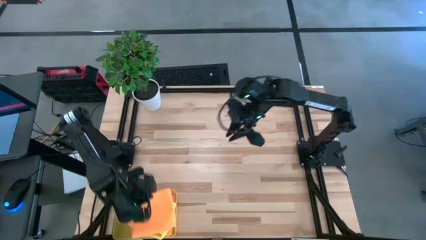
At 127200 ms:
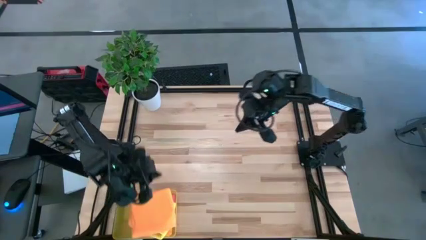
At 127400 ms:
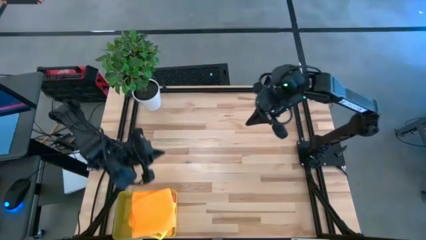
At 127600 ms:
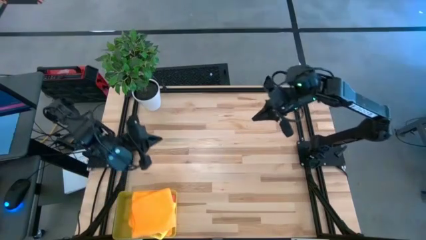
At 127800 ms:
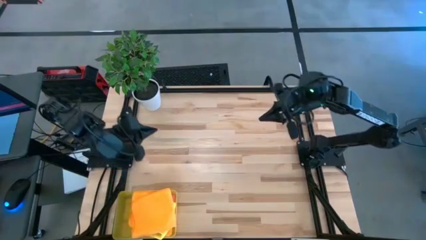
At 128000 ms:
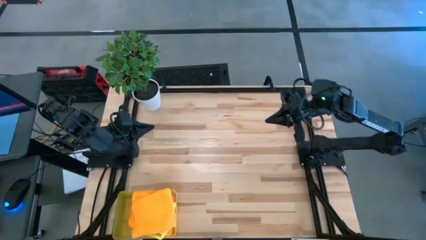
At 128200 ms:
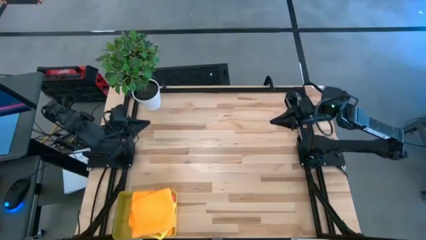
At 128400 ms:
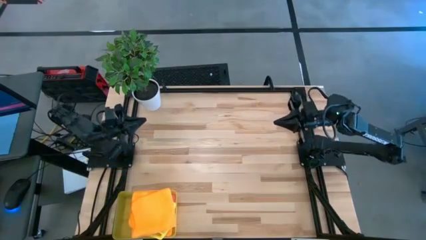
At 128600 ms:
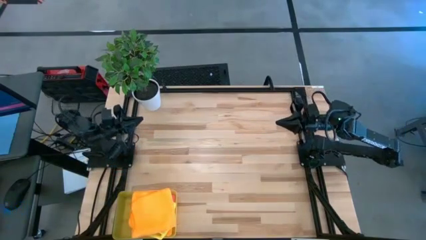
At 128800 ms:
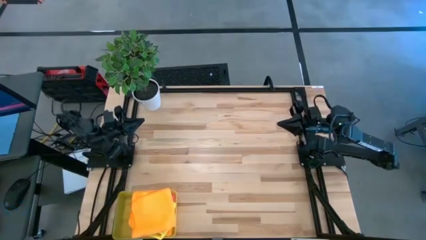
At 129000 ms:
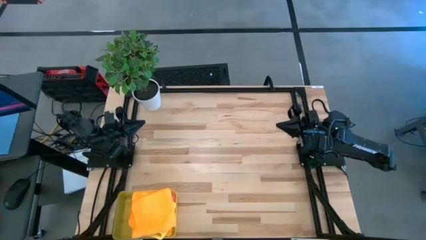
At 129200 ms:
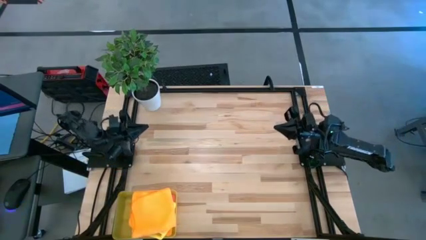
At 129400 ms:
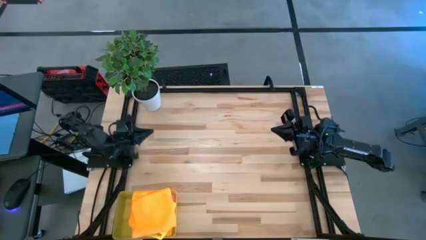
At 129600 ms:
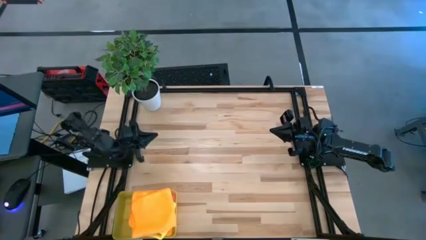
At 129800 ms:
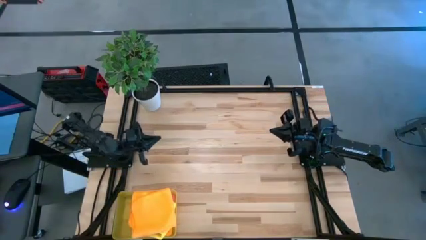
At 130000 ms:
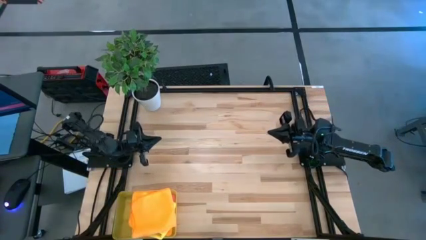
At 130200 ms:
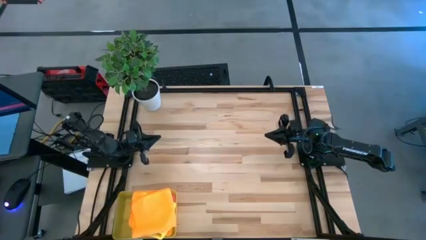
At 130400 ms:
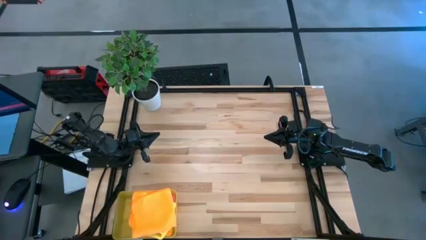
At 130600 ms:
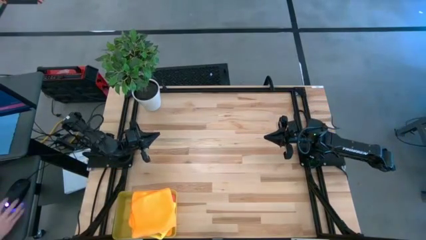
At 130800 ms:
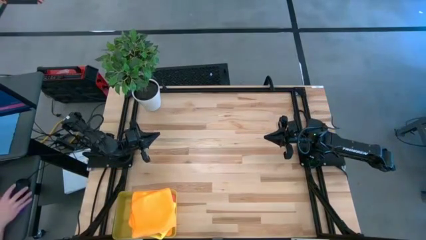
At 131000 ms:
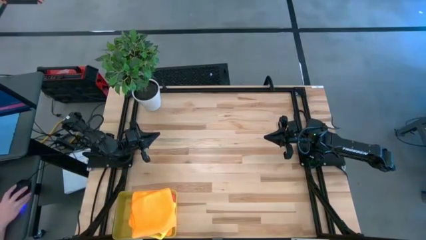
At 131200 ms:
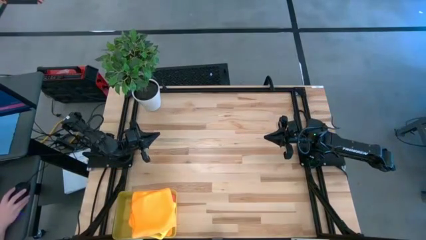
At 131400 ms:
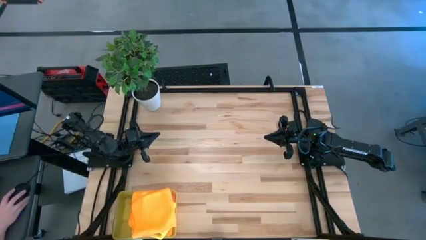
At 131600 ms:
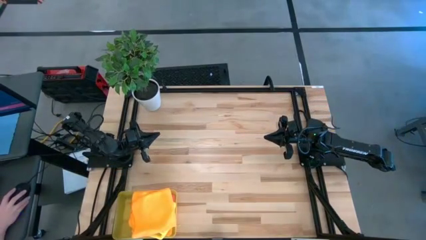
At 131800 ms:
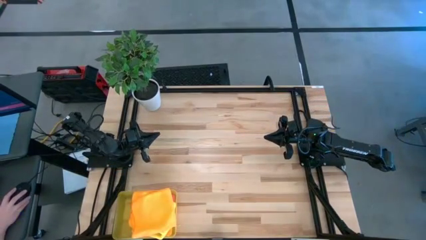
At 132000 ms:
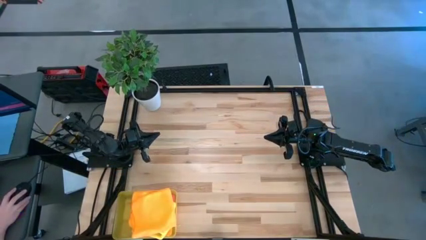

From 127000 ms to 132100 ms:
Task: Fold microfiber towels
Return to Home Position

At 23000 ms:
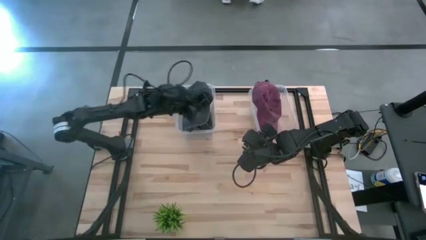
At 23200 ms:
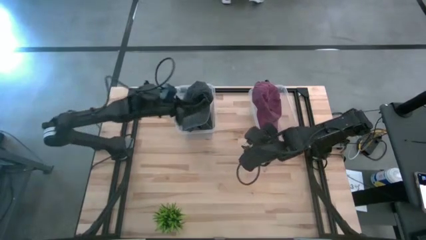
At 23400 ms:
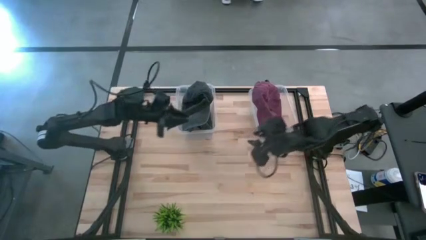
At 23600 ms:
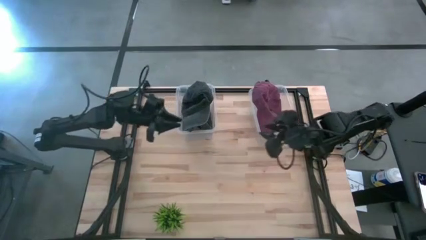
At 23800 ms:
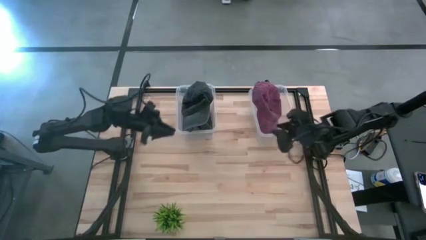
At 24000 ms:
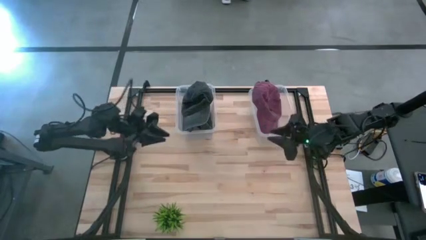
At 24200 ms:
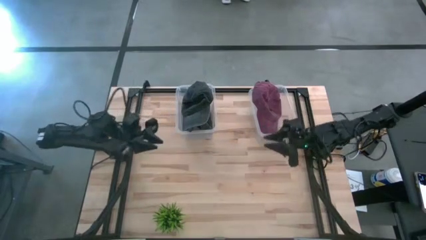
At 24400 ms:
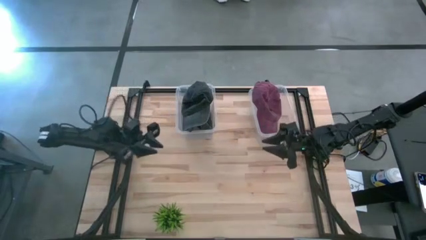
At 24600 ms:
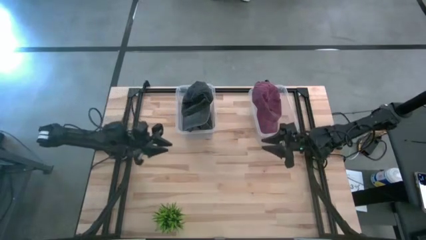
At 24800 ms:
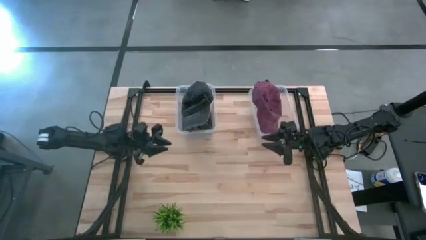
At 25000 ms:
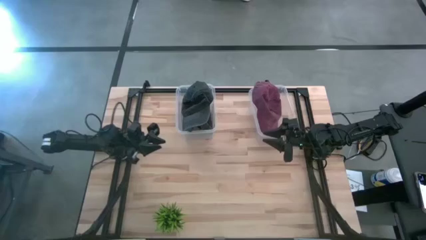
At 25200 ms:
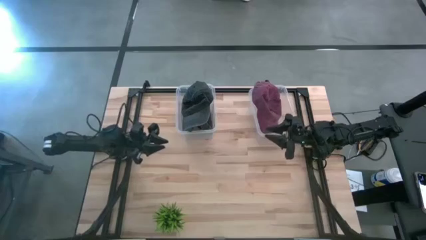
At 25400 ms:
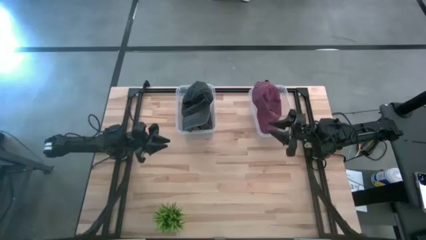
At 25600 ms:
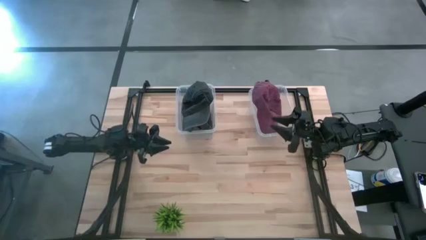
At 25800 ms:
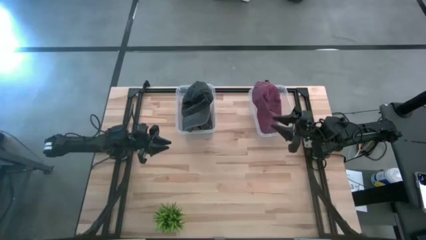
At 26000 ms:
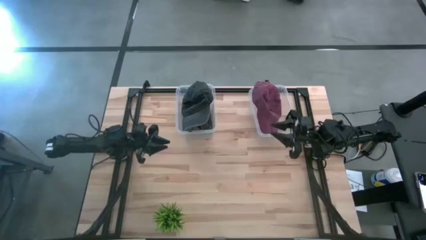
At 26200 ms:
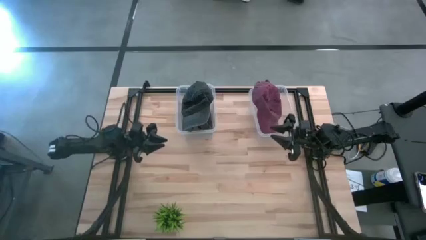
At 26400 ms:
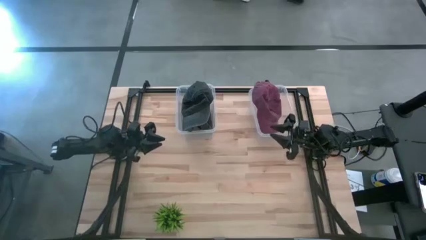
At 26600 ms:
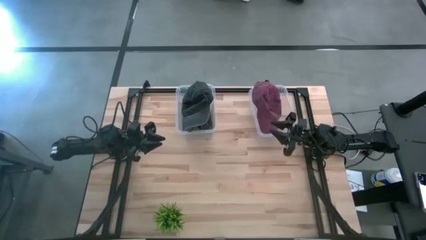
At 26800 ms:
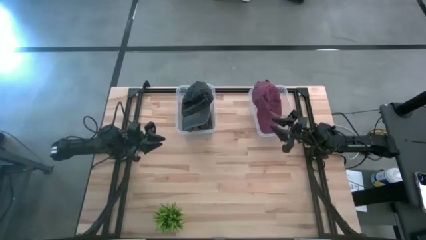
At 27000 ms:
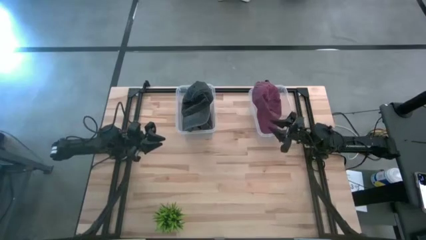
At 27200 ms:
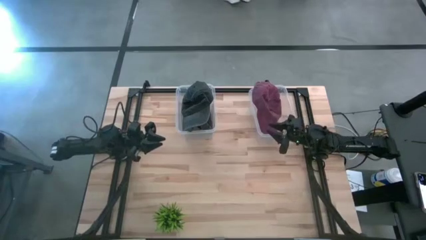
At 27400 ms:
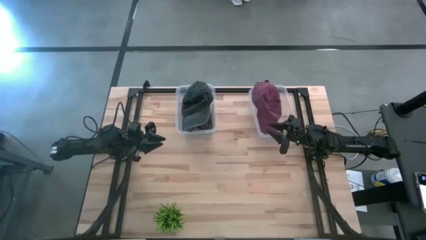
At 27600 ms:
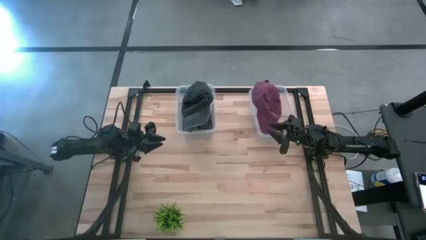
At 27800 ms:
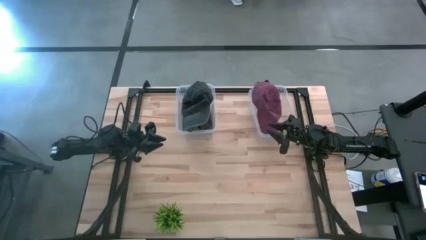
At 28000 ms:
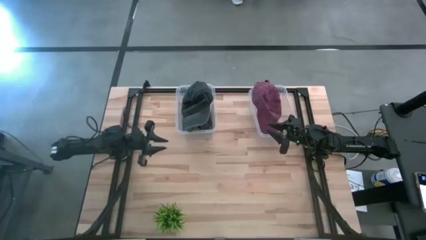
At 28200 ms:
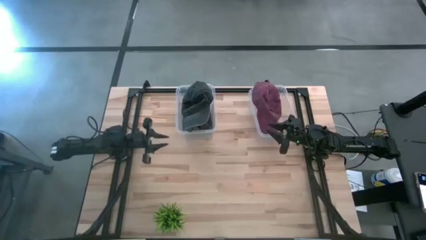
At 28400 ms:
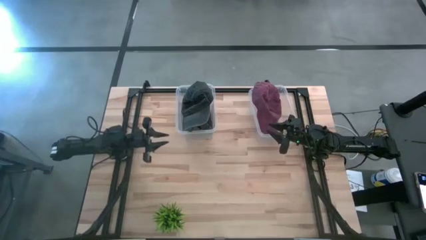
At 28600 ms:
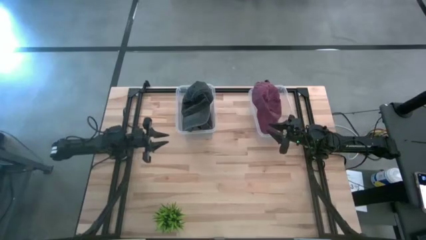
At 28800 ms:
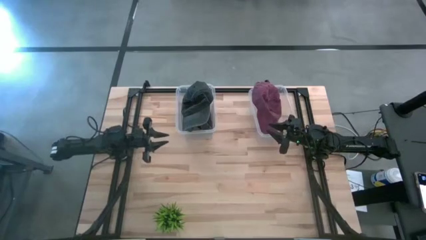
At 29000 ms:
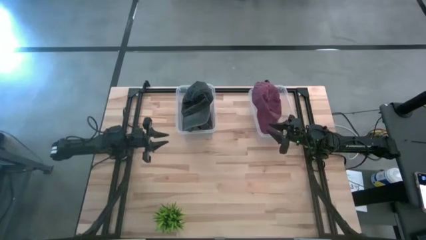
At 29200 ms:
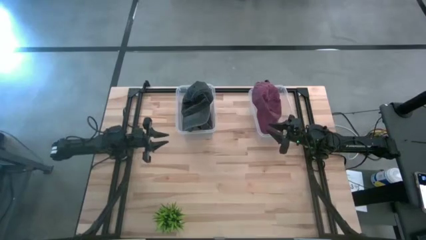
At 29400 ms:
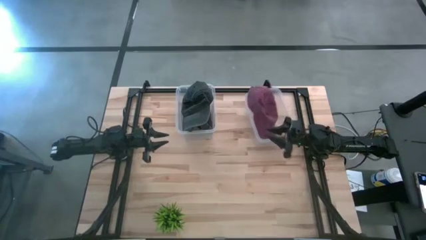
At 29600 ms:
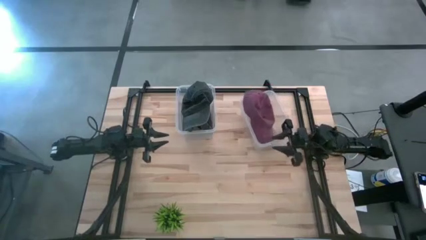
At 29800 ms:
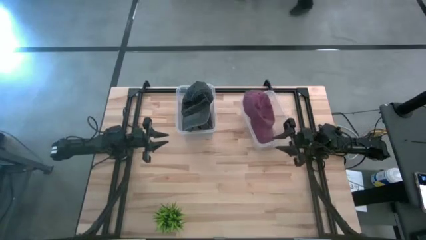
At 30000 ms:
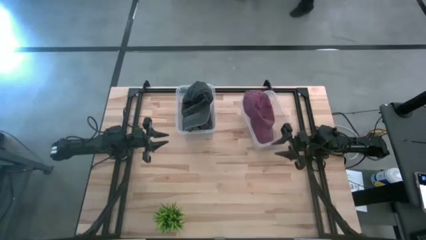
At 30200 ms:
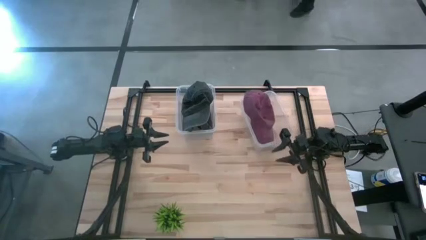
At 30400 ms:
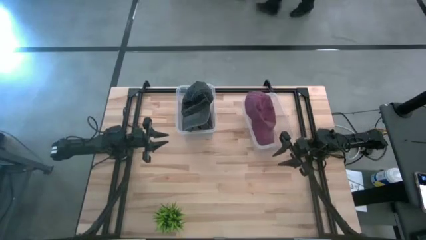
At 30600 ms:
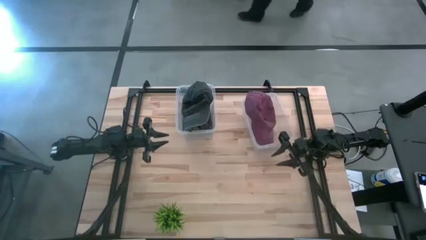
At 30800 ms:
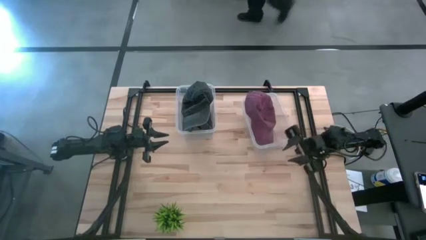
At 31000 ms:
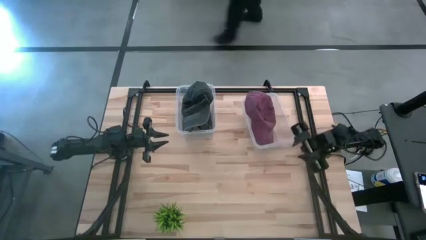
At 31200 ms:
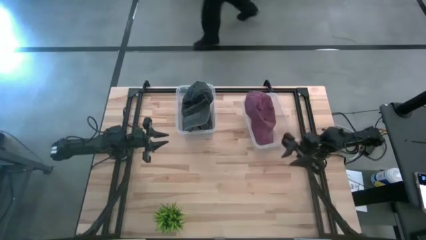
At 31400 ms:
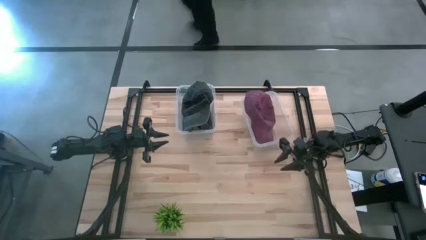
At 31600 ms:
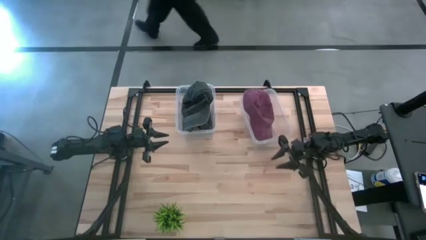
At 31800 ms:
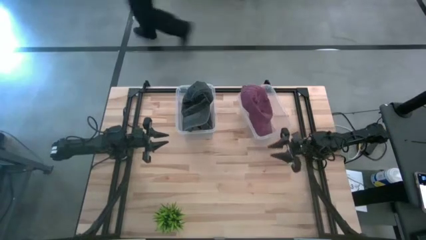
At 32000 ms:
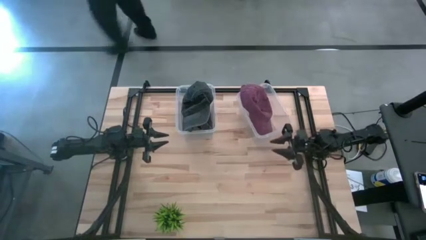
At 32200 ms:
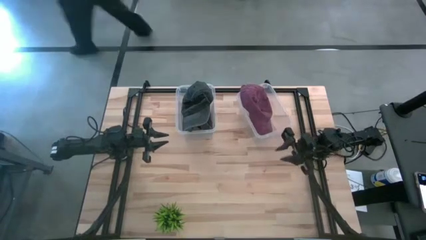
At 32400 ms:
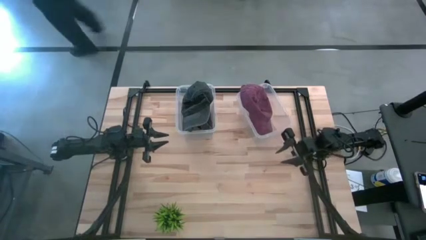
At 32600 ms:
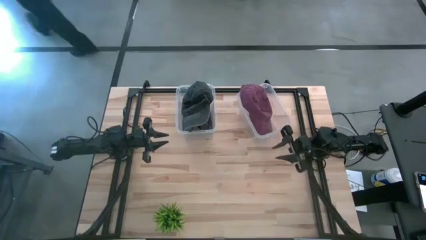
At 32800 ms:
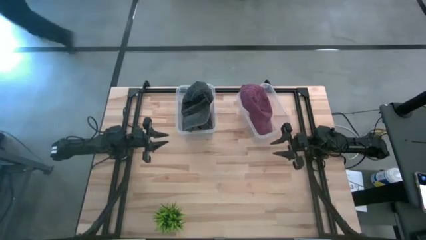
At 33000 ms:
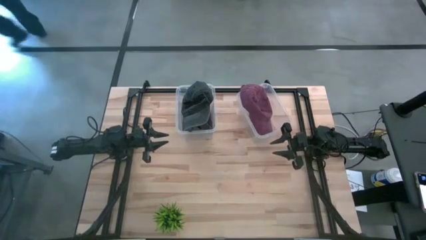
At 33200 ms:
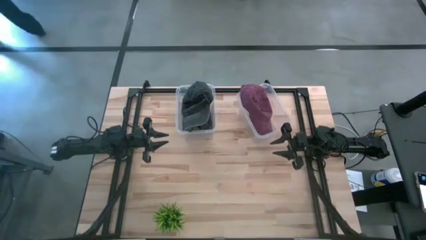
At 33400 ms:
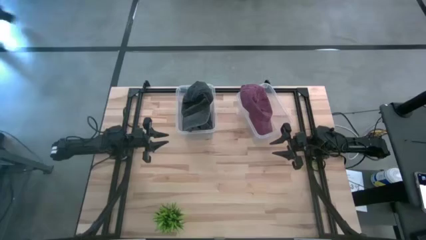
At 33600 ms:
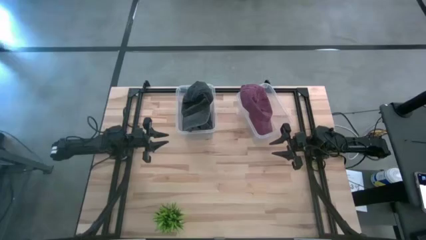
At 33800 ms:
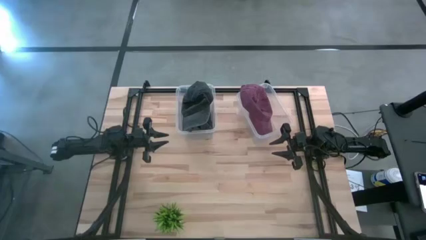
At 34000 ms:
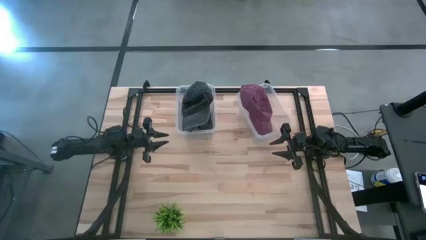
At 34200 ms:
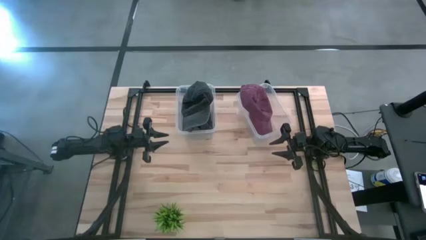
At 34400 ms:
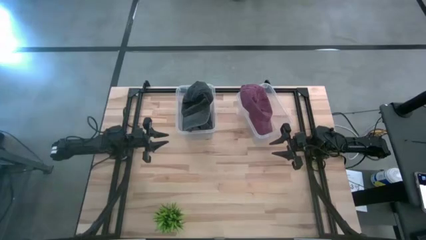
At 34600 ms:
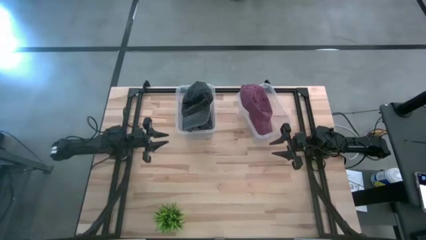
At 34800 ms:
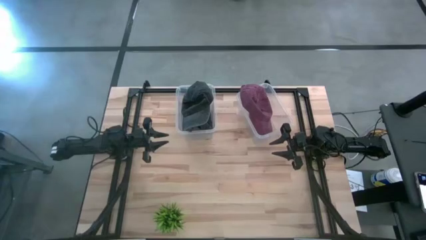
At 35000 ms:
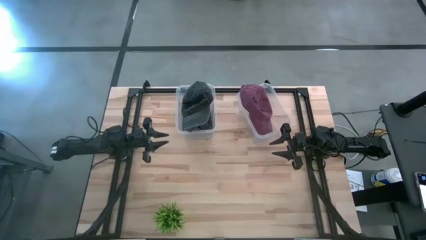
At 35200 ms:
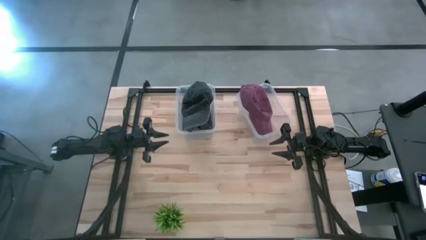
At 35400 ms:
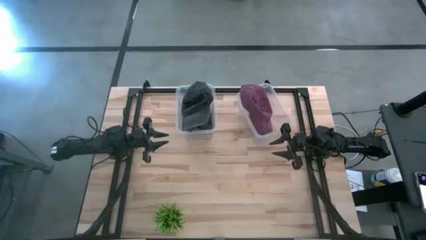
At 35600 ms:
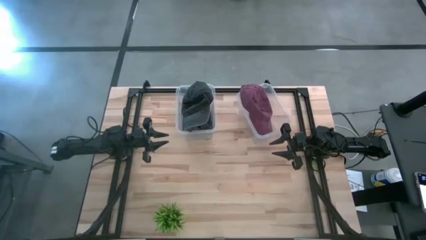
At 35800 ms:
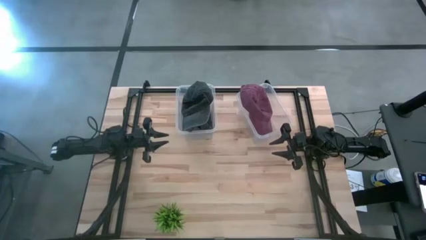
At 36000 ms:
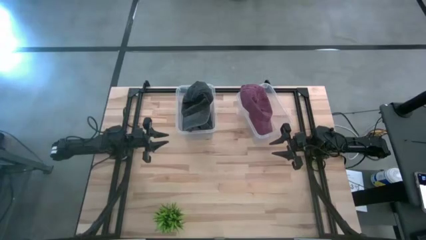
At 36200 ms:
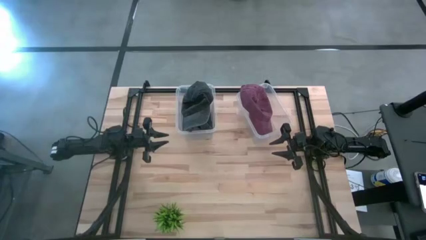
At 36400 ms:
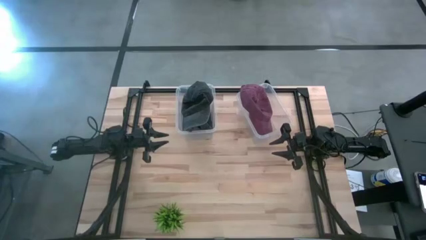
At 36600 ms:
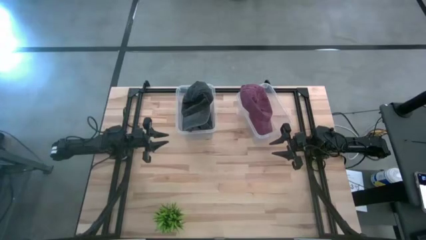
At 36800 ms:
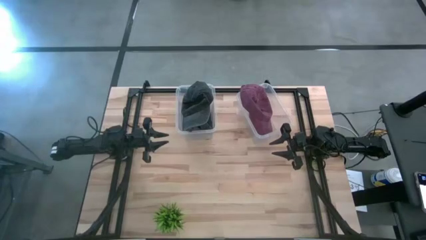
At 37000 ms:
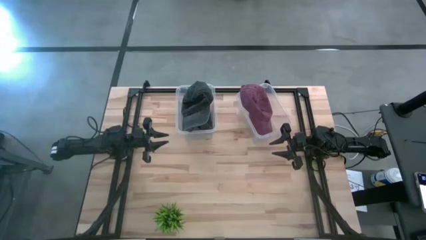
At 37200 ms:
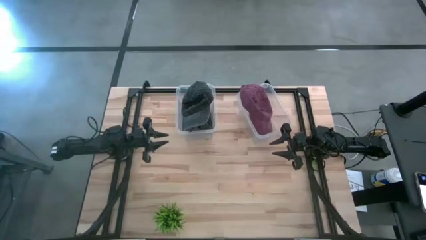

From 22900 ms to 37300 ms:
Task: Pick & Place hat
Return to Home Position
